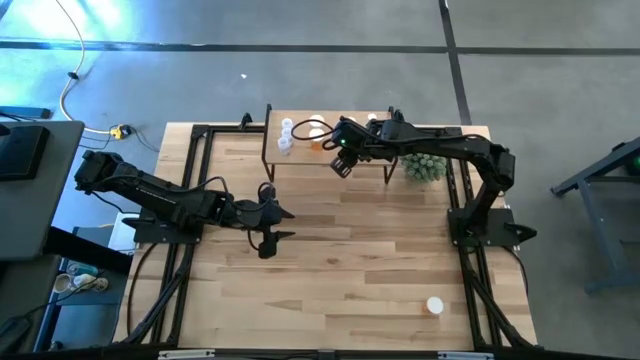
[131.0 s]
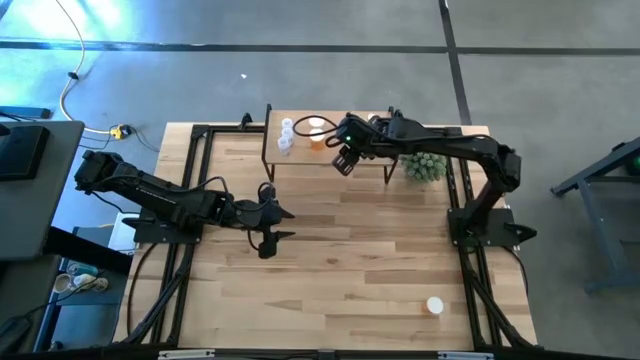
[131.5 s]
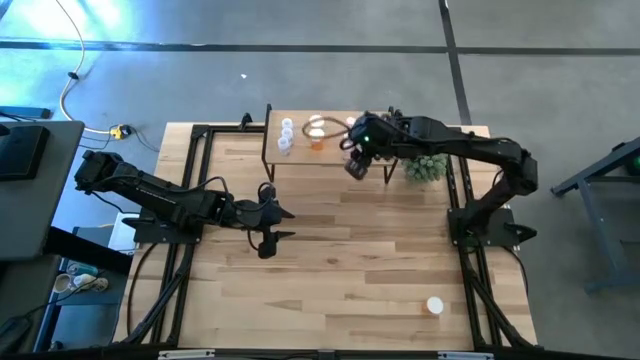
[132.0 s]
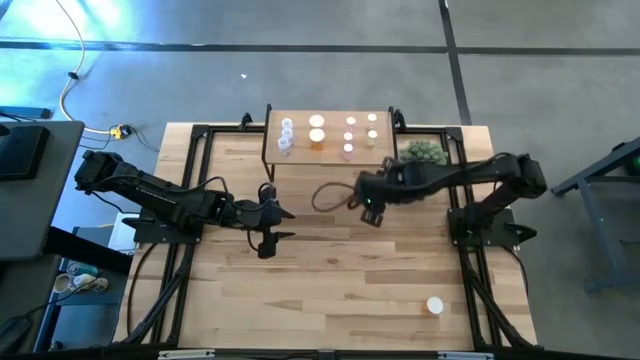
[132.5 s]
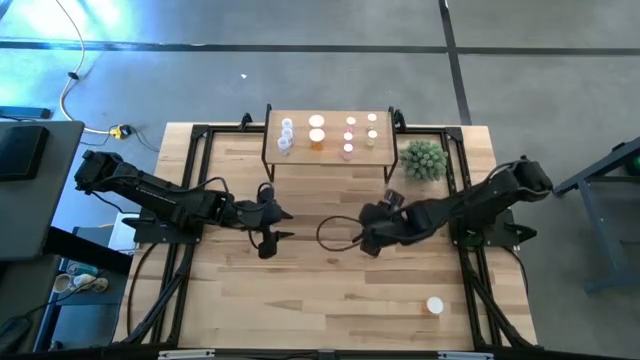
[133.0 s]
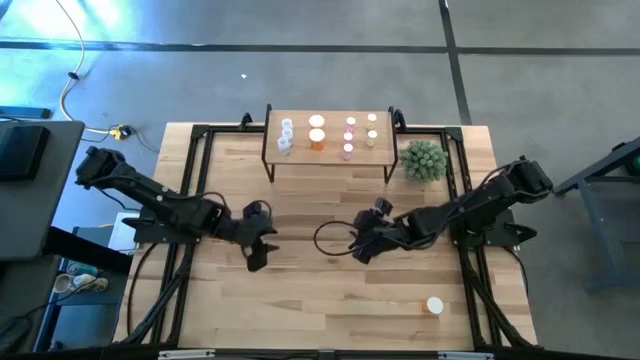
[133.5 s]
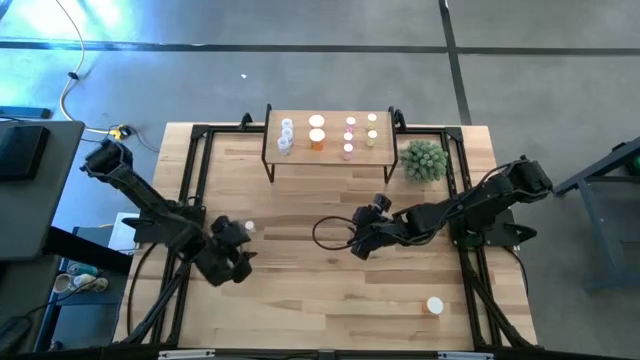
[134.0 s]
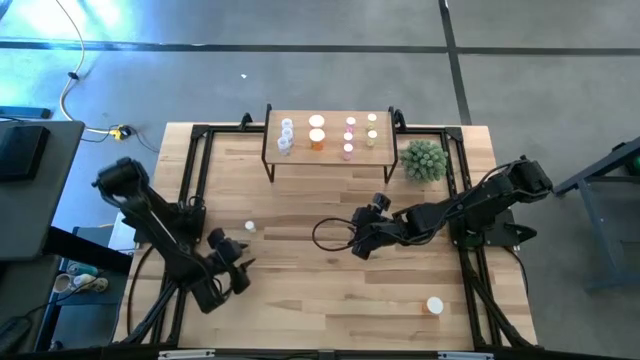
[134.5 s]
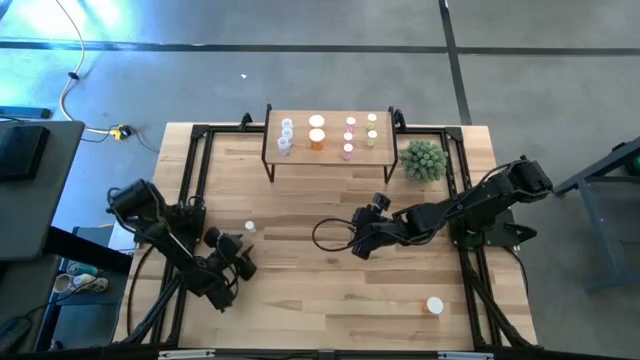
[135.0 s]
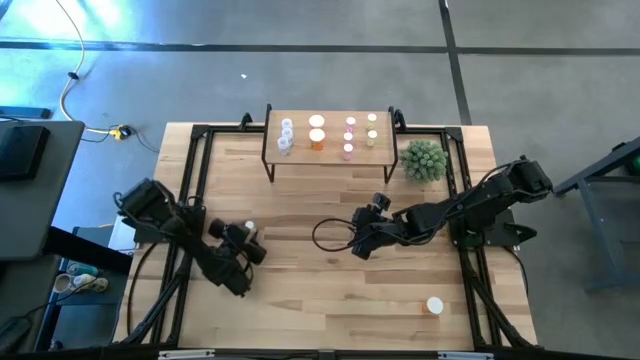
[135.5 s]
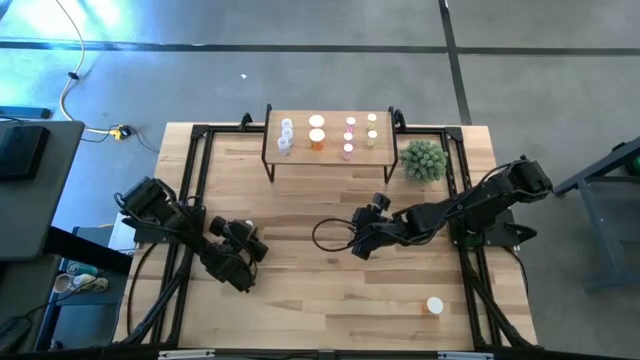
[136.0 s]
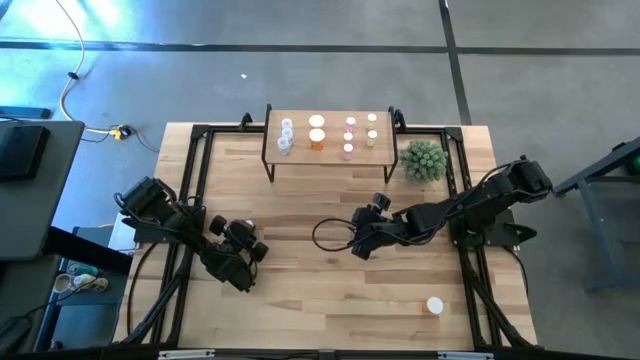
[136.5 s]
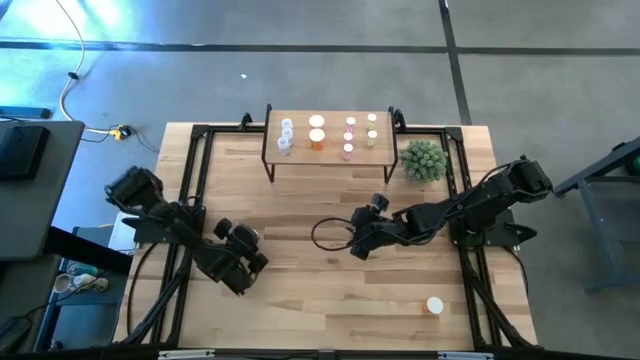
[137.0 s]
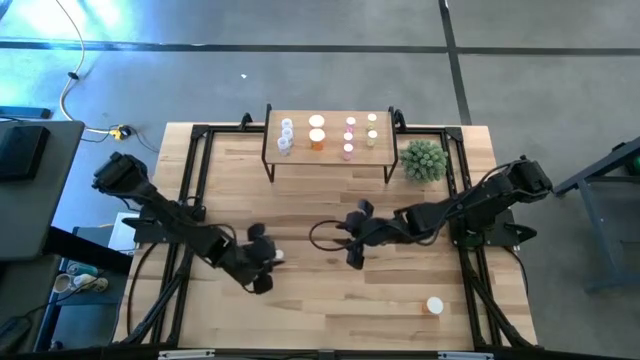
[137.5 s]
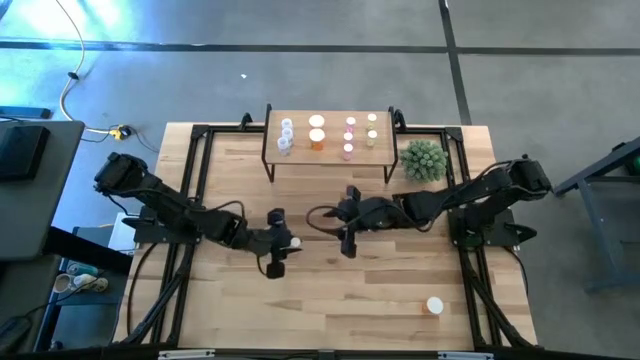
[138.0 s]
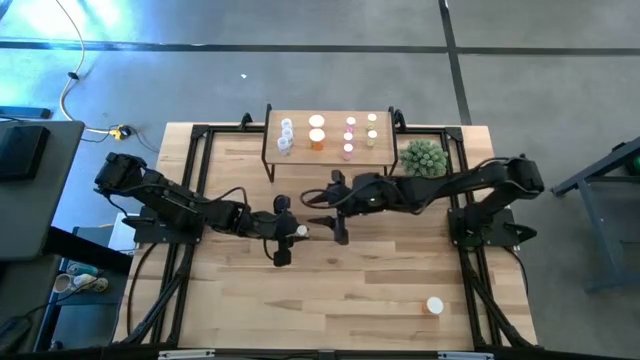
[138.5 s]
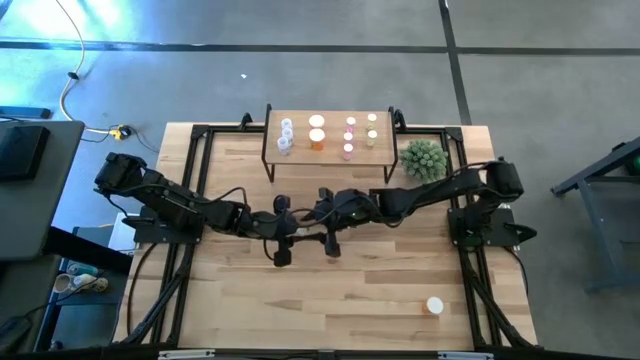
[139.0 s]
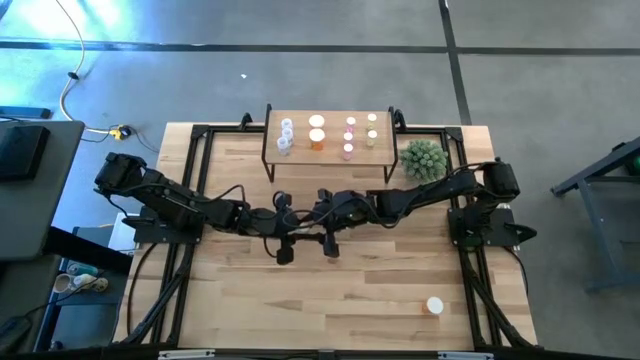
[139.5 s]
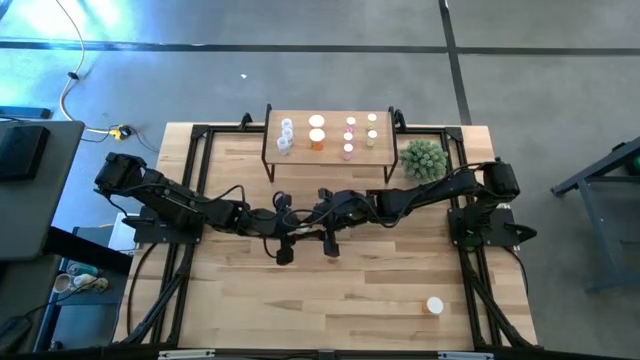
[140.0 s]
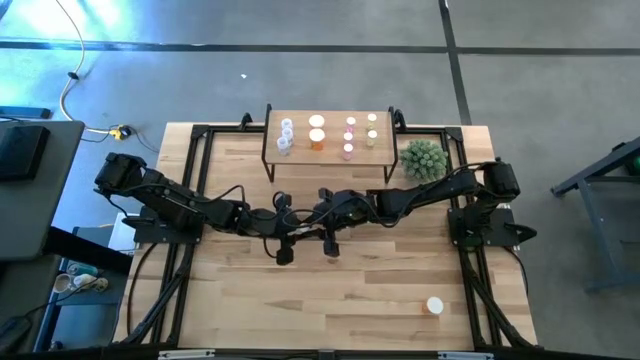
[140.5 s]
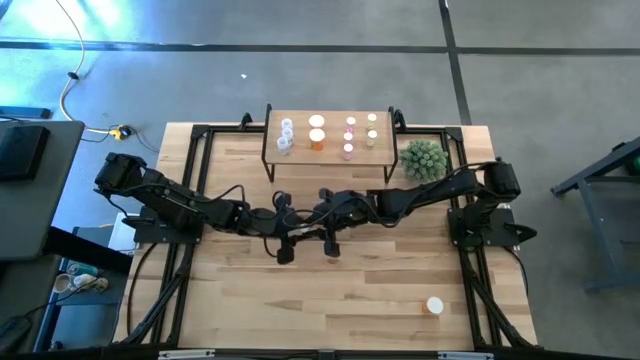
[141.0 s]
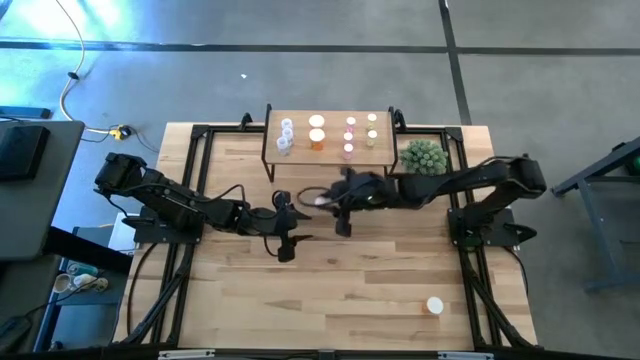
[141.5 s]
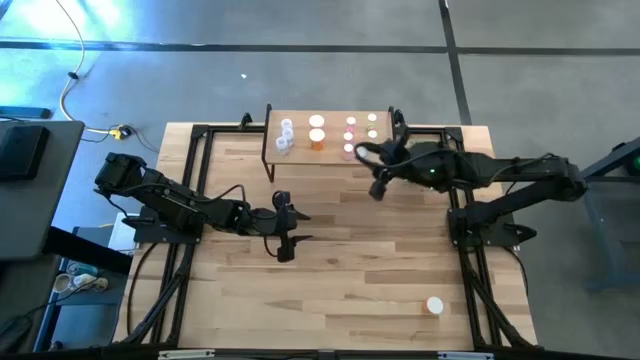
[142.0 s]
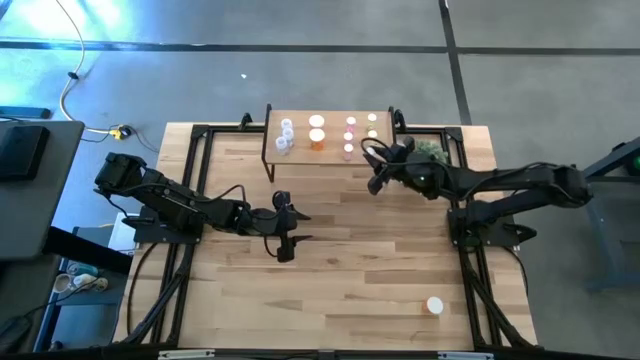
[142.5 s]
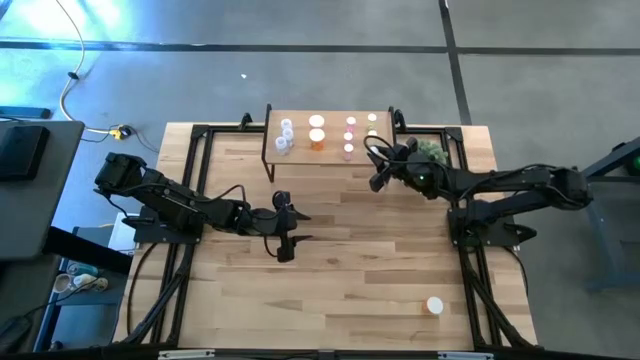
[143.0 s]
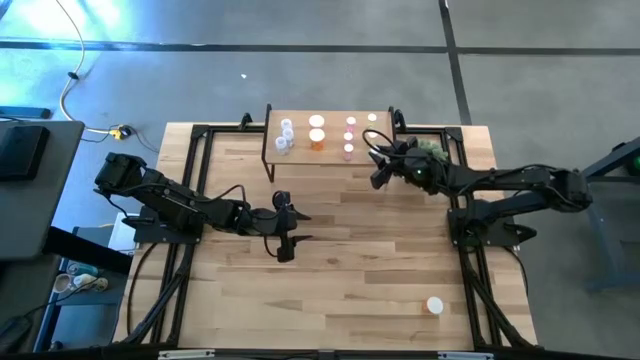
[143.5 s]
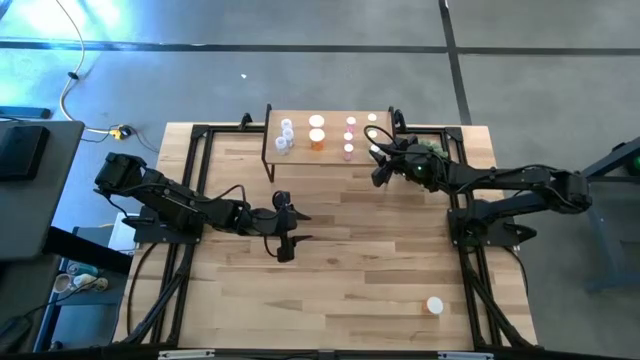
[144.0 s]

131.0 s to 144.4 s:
Task: Pick and place medicine bottles onto shelf by color
Put the yellow pill bottle aligned with the other yellow pill bottles on the shelf

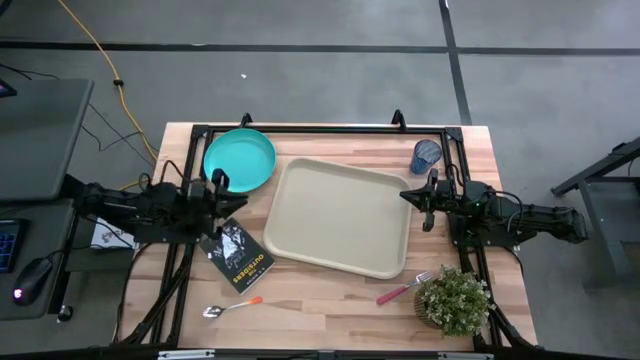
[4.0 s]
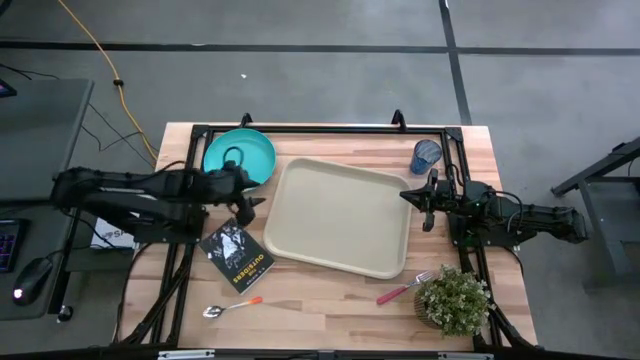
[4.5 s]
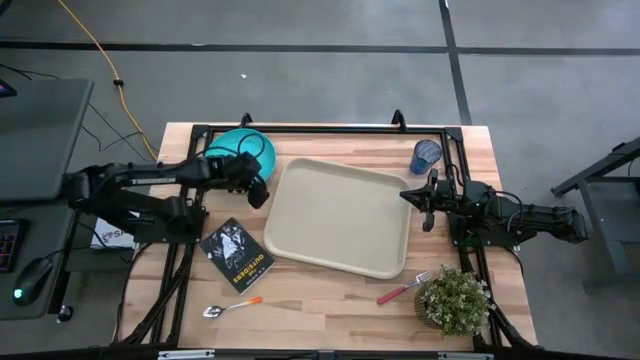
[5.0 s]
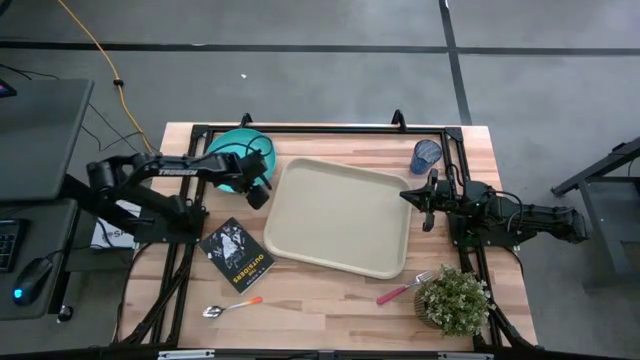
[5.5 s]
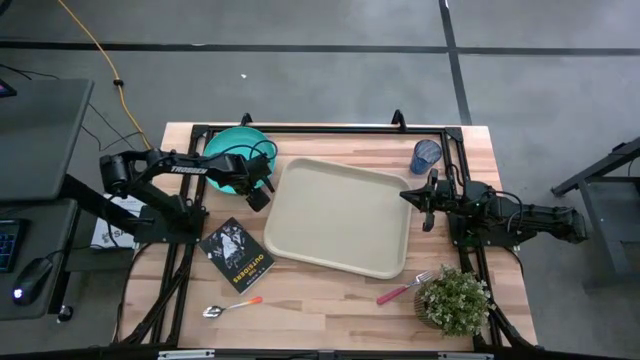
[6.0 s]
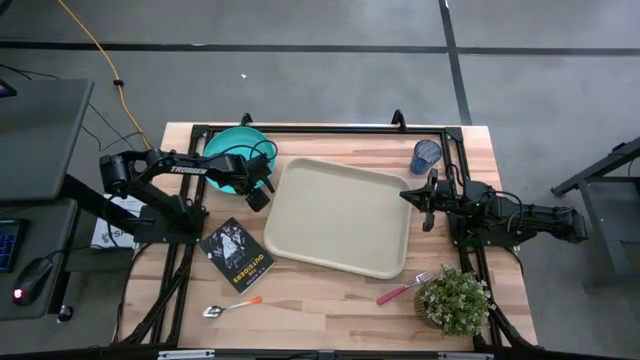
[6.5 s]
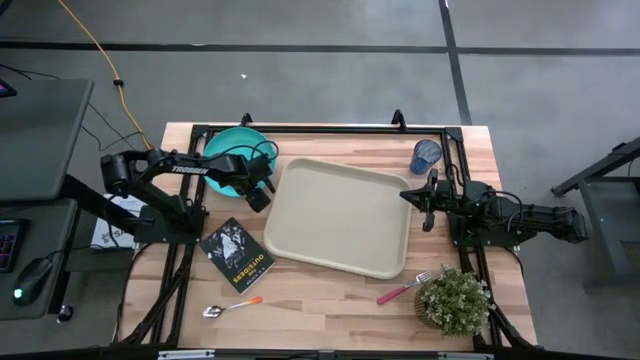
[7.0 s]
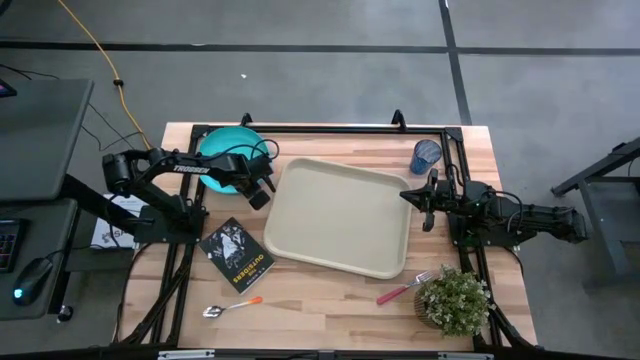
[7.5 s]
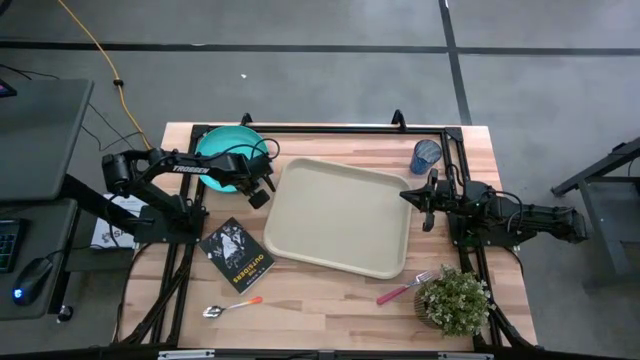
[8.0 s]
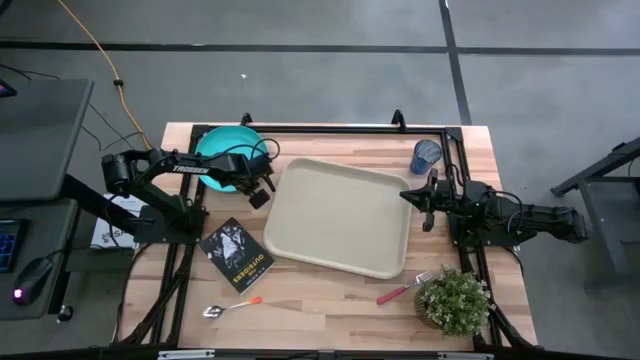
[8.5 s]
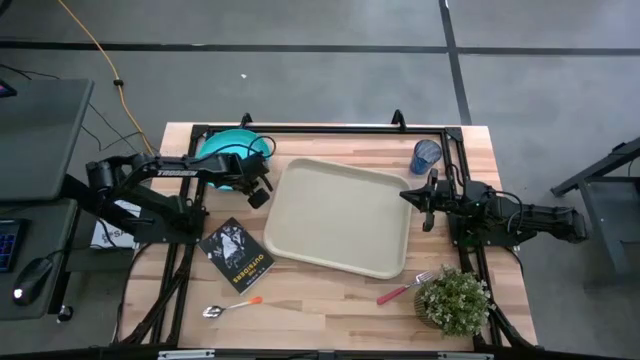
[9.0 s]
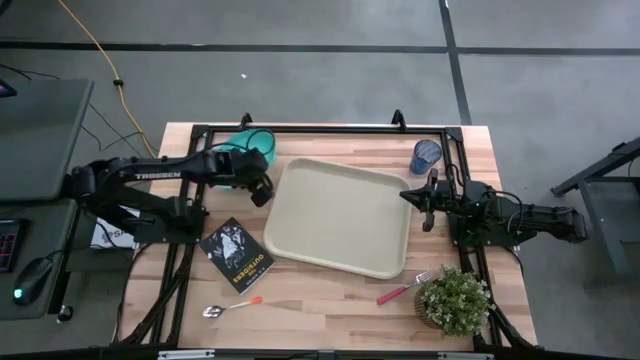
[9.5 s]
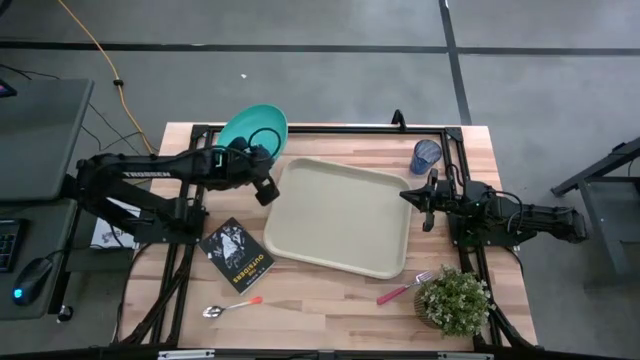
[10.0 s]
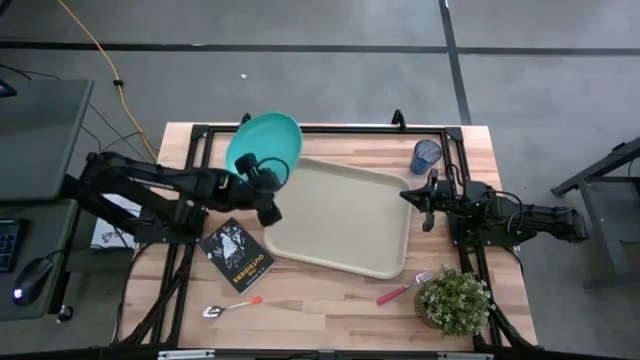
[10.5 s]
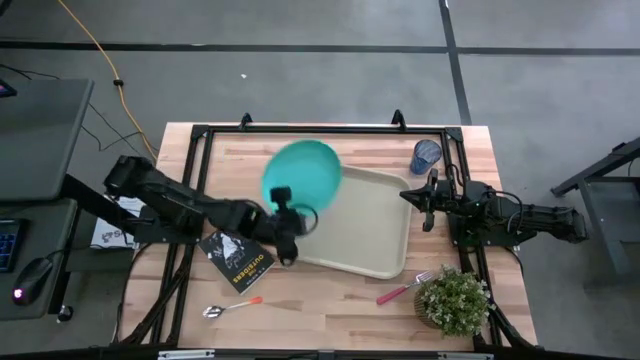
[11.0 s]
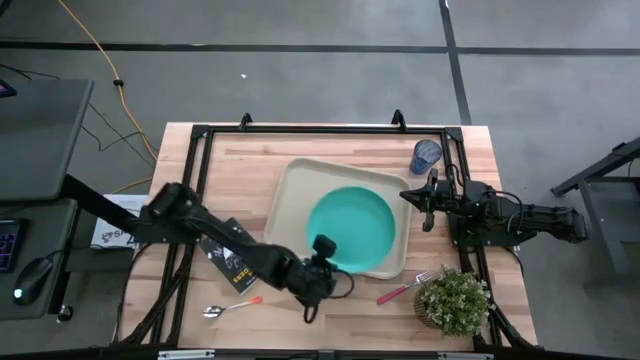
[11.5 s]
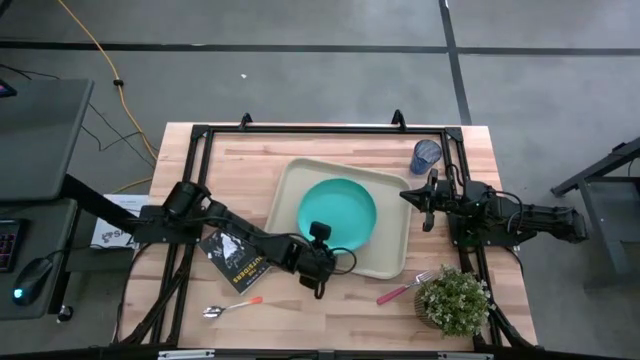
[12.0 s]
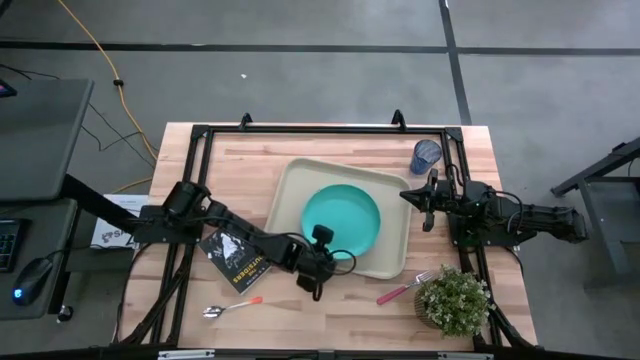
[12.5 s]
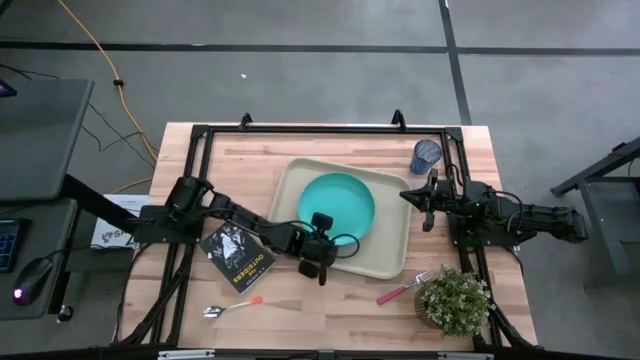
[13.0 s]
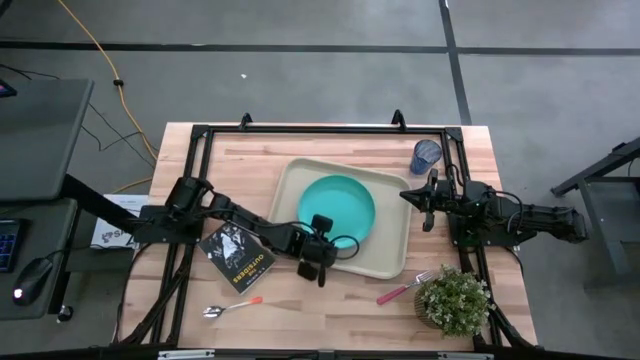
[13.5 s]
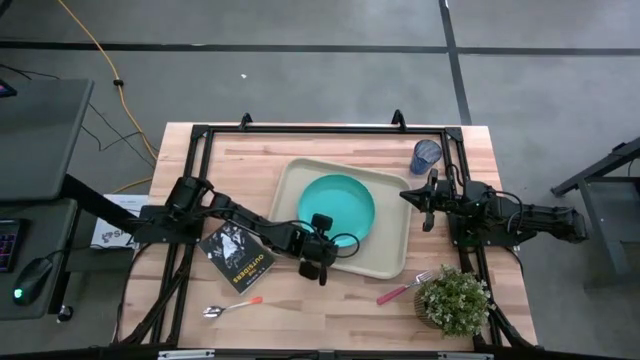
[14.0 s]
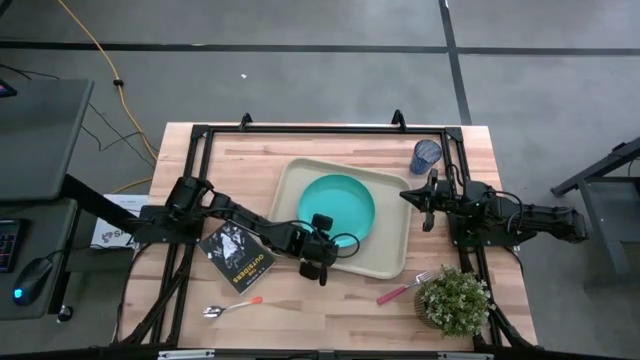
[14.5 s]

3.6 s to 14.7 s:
Task: Pick and place plate/cup/fork/spoon on tray
Put the blue plate on the gray serving tray
